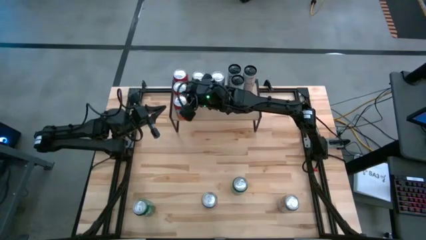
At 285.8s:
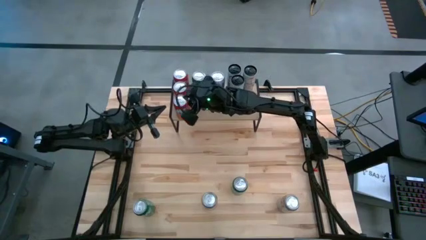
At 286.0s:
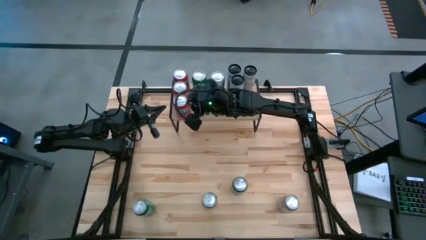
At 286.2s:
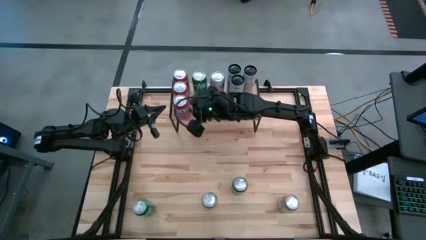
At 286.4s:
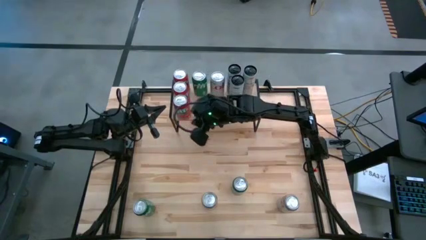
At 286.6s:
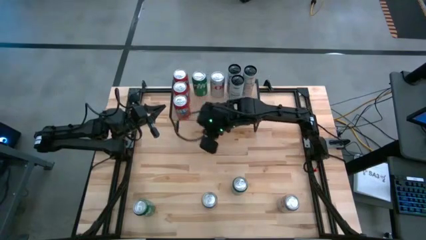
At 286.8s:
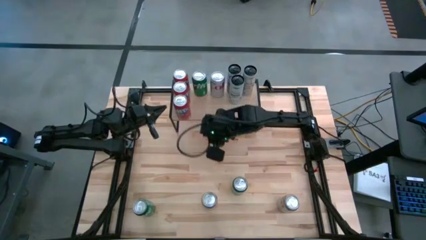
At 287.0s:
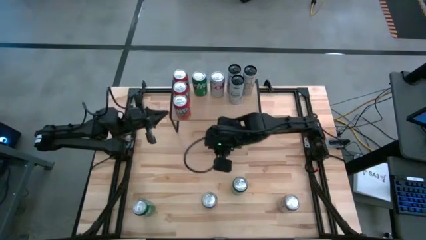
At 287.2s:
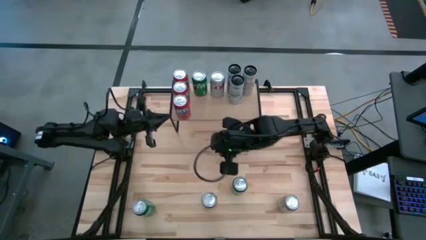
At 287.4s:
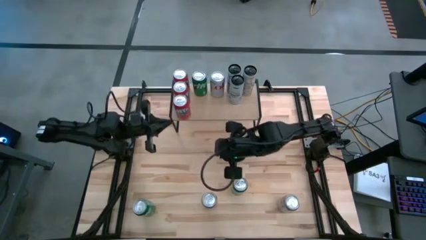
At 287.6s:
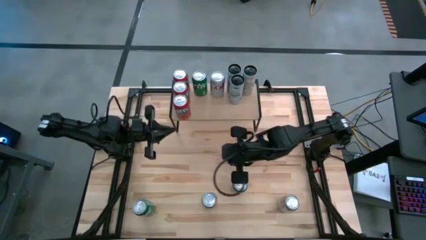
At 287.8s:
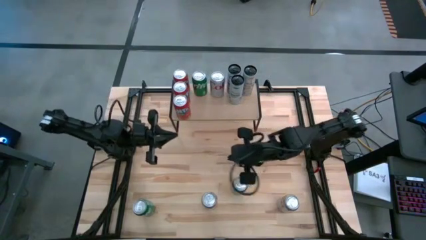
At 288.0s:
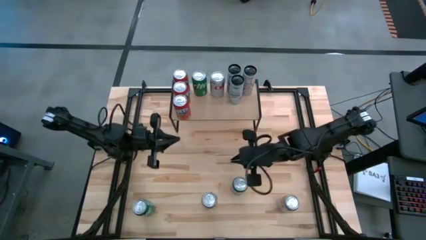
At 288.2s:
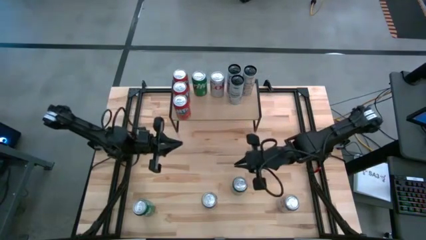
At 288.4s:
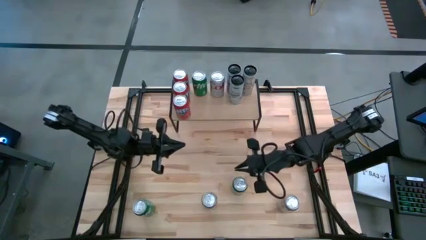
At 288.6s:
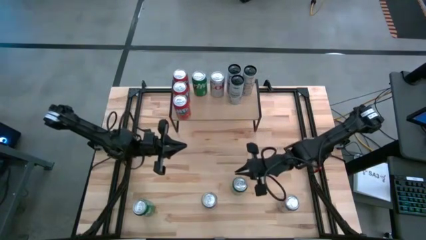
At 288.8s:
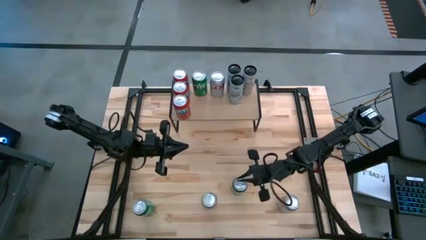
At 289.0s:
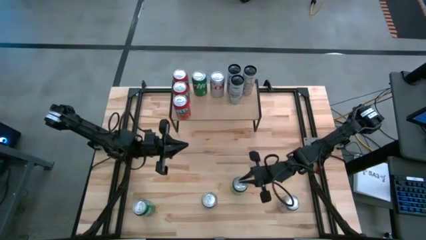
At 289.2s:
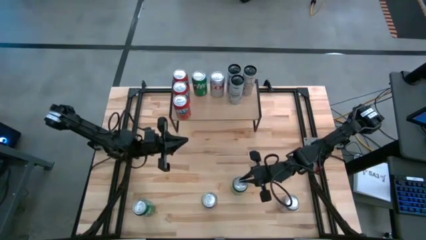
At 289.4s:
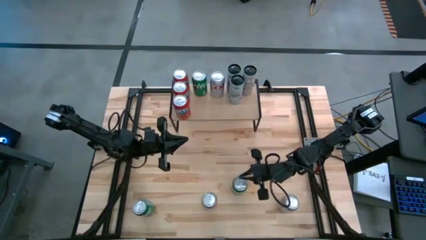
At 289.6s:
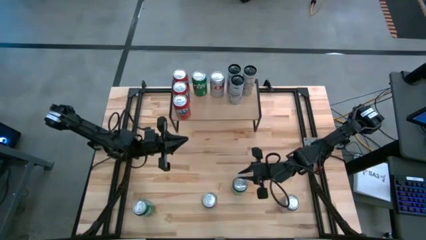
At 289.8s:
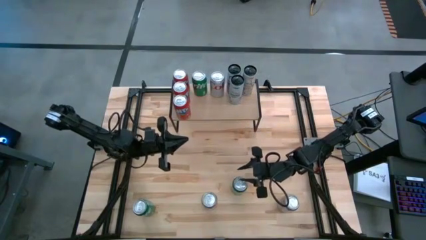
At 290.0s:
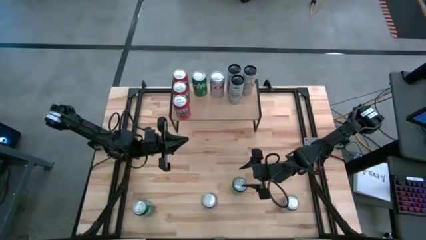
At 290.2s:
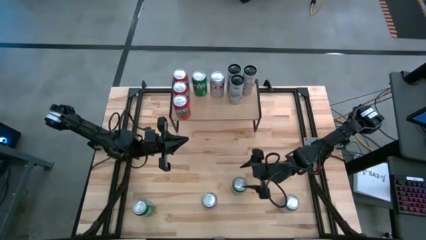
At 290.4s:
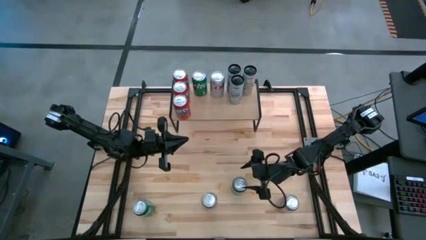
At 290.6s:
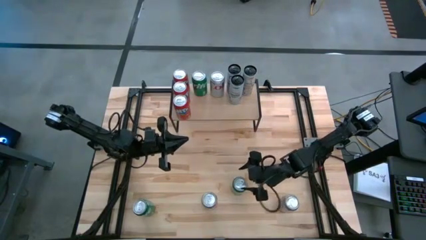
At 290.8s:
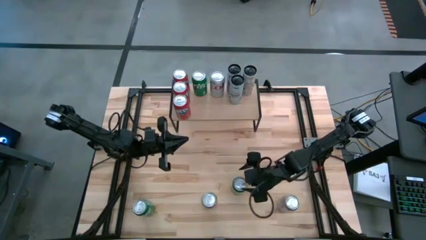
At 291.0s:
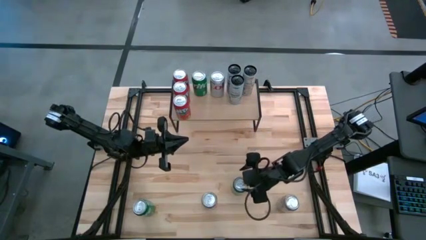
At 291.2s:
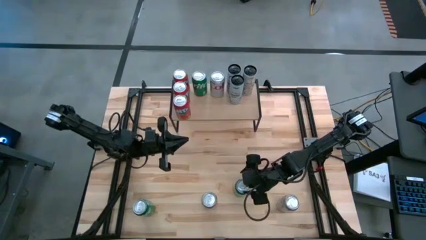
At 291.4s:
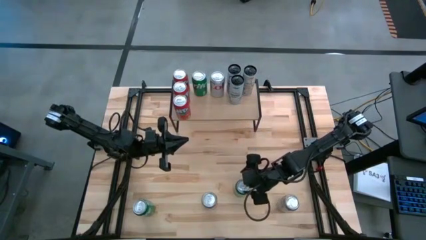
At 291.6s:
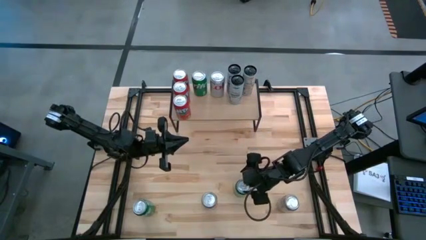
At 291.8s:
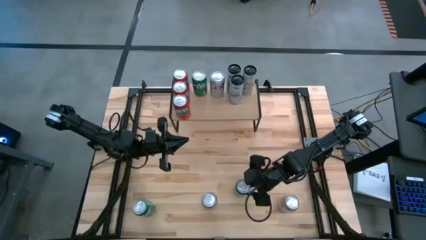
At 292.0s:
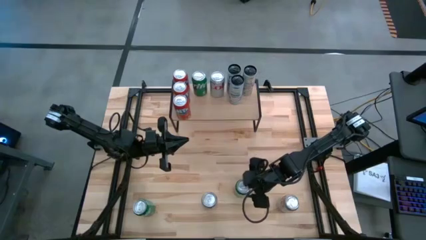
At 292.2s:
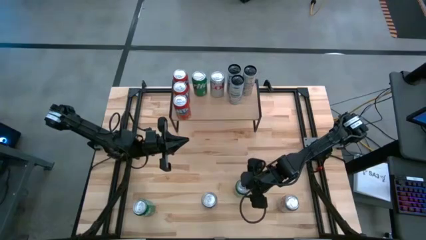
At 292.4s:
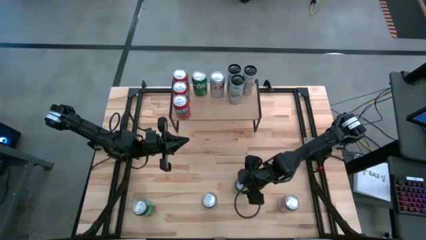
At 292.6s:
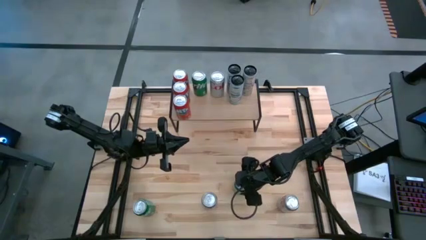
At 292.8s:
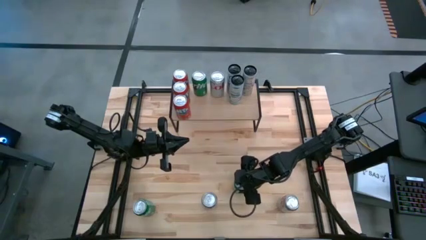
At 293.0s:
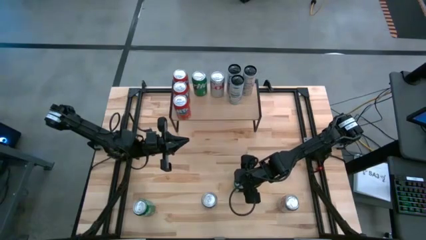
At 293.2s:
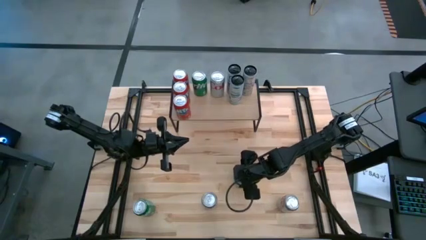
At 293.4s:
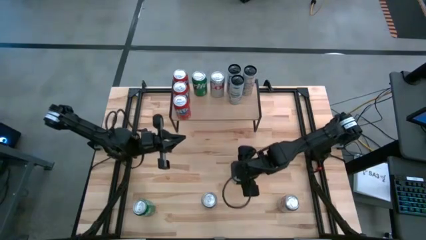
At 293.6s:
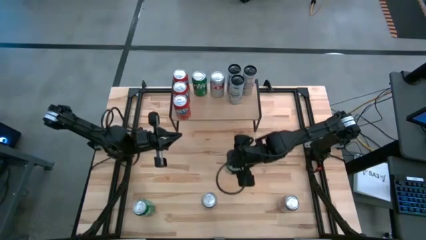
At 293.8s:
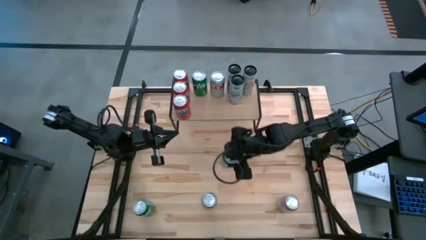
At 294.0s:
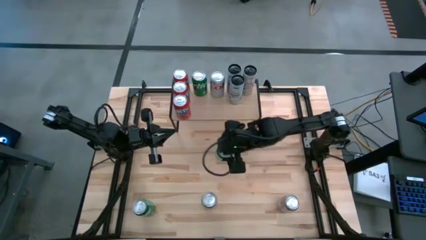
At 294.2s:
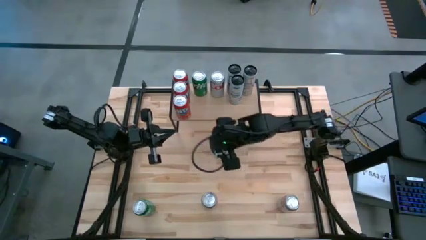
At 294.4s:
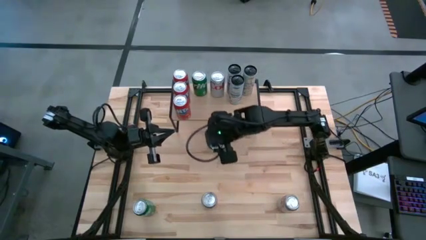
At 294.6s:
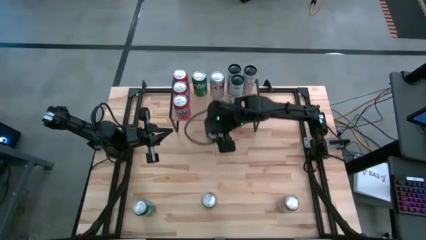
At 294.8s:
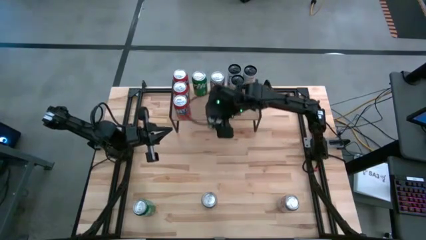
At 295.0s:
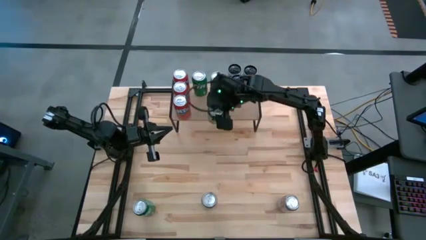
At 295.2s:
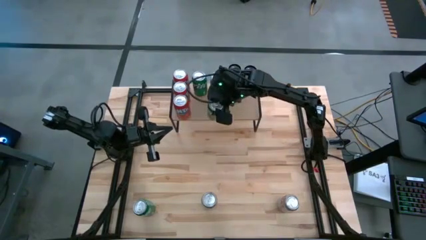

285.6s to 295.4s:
Task: Place canned beverage on shelf
Put the right green soda can on the shelf aligned with the other green soda can

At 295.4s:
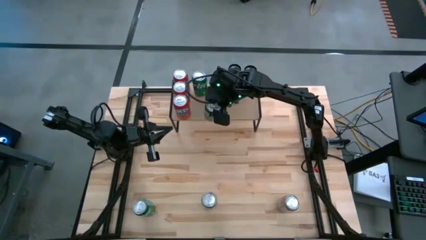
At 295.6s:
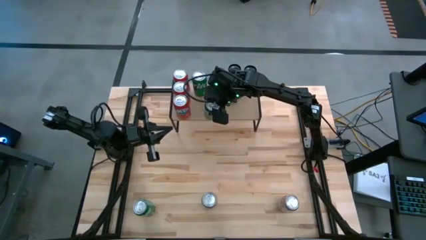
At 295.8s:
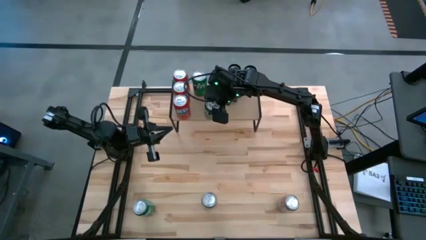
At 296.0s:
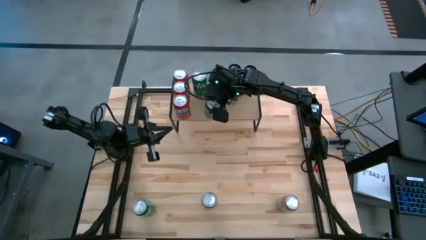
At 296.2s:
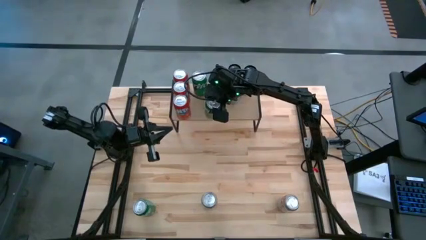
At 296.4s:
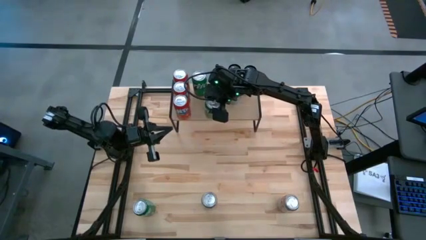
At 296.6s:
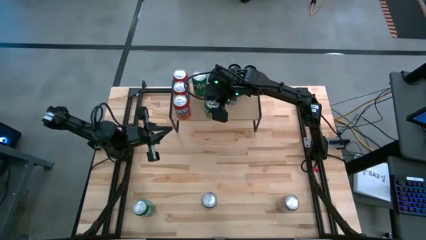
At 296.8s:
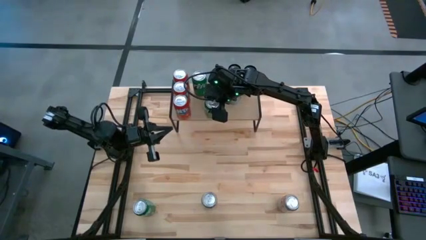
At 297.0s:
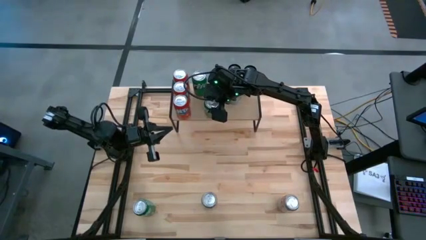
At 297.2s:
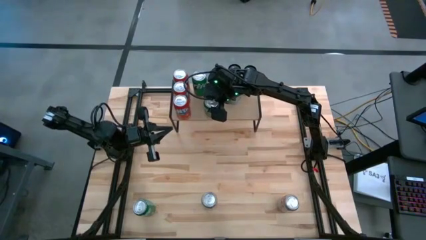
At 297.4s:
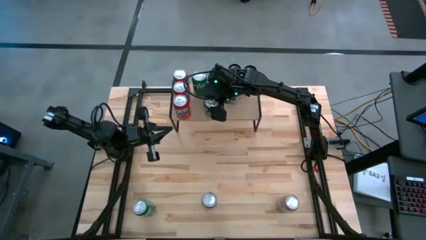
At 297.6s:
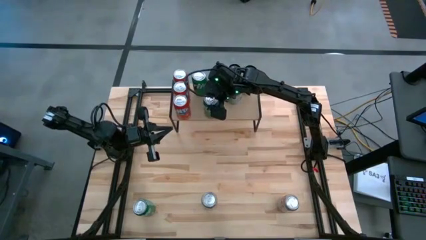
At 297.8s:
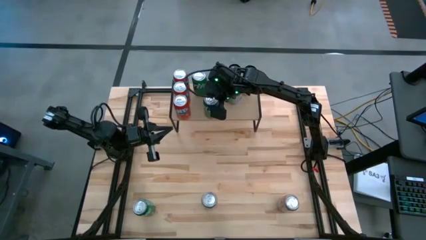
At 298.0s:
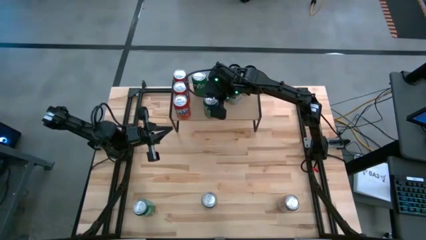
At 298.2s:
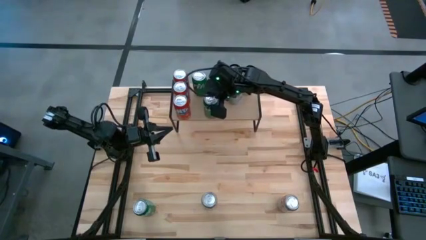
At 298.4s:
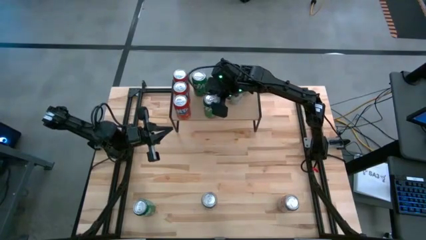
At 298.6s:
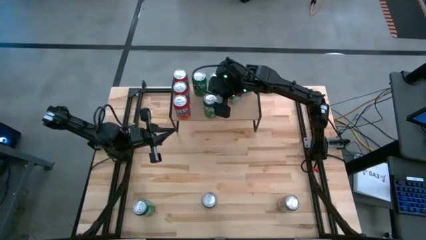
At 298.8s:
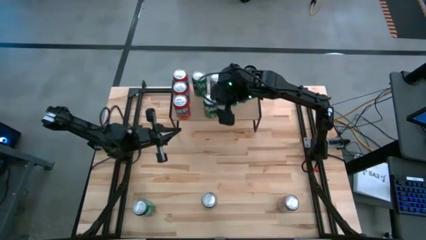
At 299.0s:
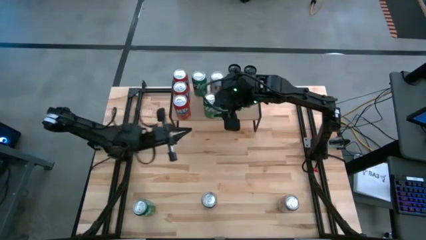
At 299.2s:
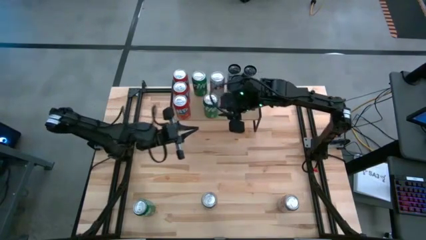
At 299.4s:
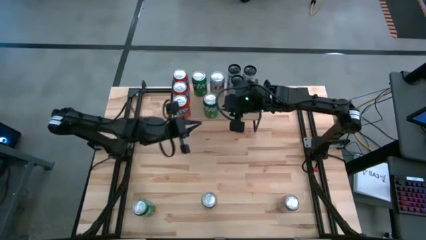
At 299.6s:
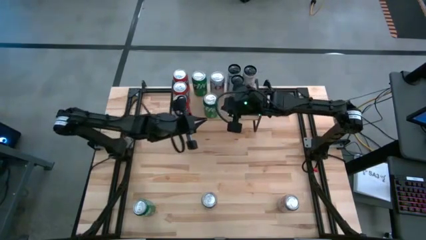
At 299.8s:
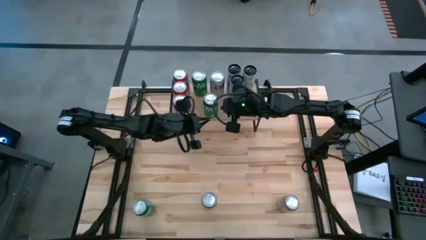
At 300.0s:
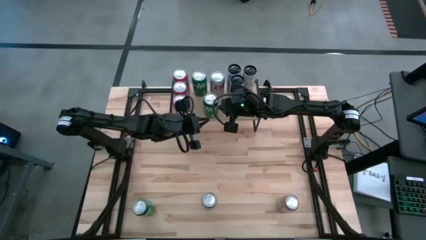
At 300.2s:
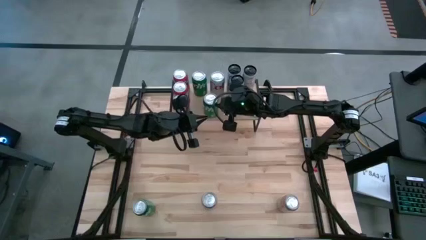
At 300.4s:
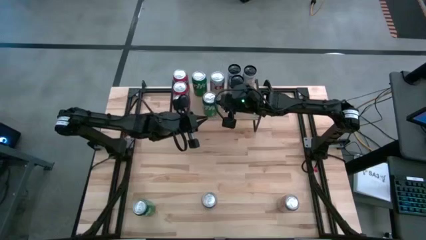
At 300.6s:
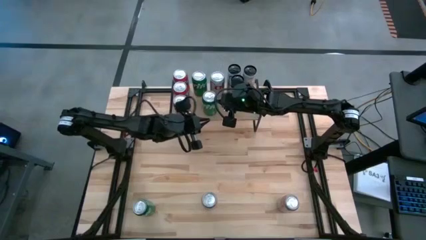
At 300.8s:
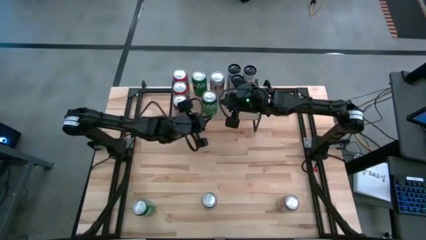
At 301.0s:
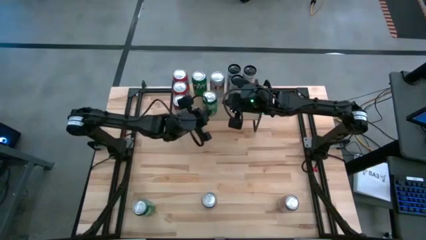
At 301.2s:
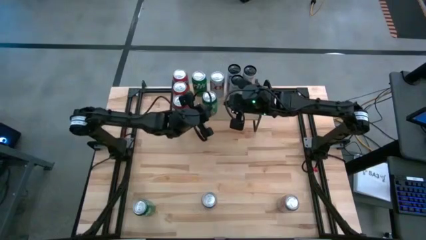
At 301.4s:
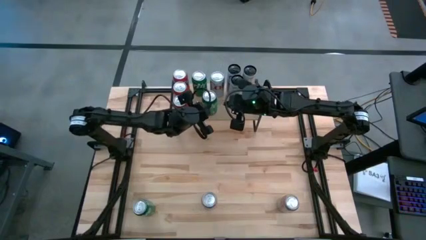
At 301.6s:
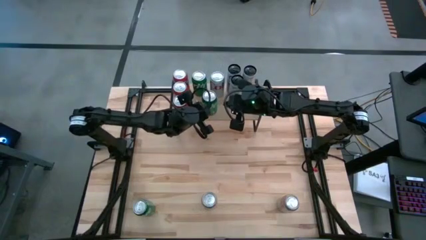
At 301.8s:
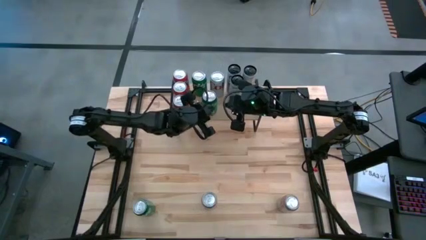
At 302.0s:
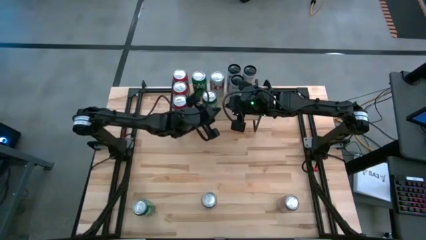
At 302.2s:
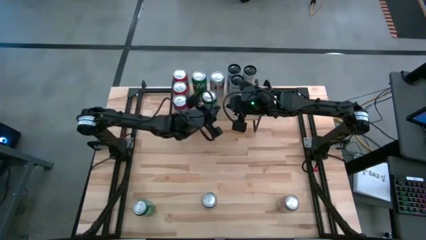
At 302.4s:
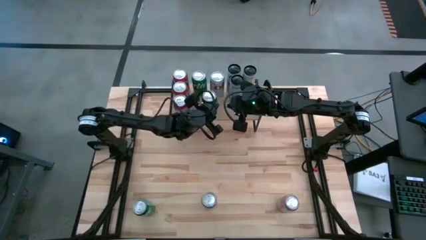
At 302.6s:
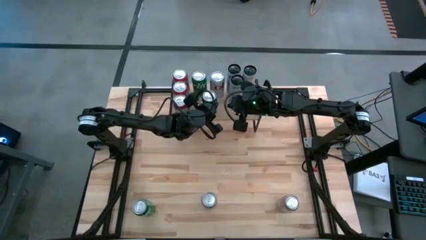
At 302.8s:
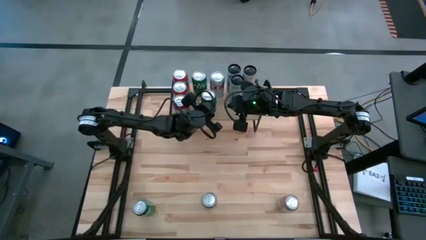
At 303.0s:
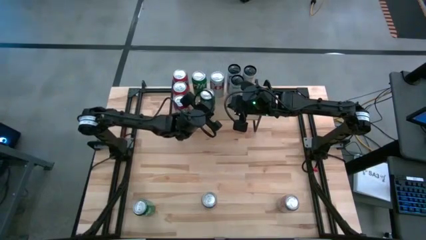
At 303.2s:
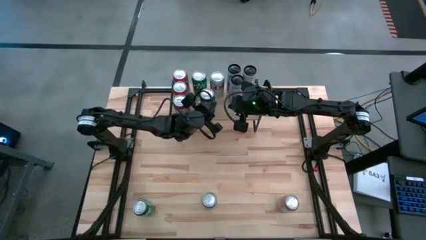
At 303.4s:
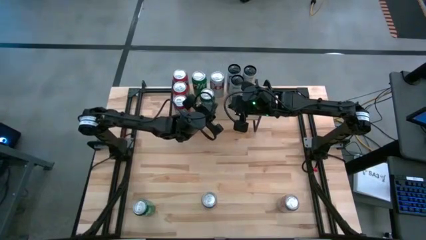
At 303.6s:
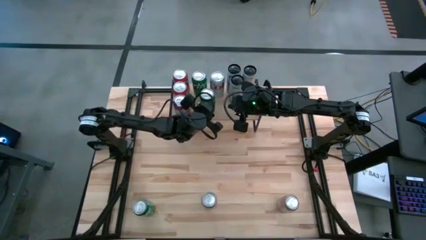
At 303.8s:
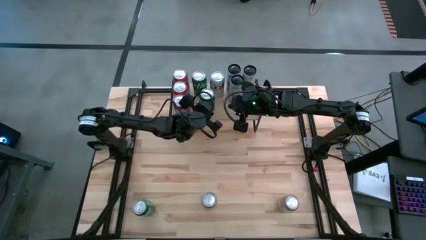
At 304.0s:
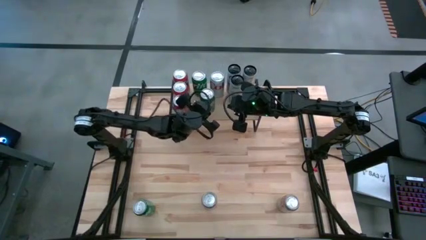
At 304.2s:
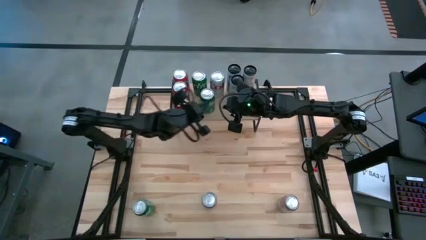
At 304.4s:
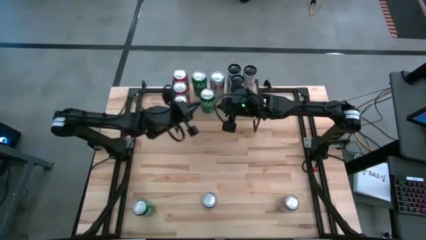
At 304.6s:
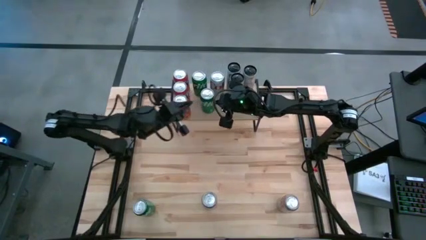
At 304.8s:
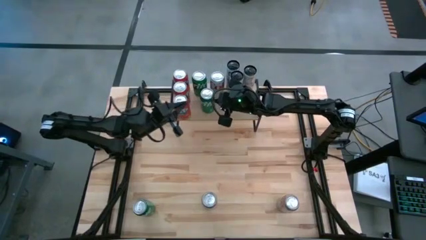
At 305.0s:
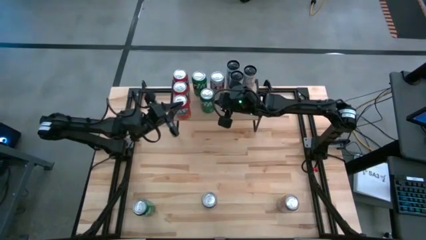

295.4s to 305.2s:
Put the right green soda can on the shelf aligned with the other green soda can
